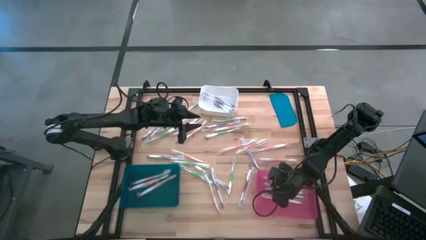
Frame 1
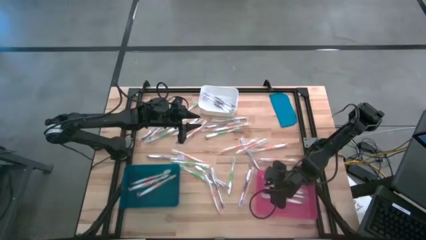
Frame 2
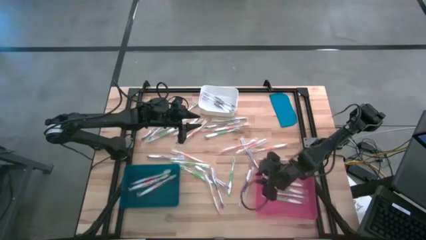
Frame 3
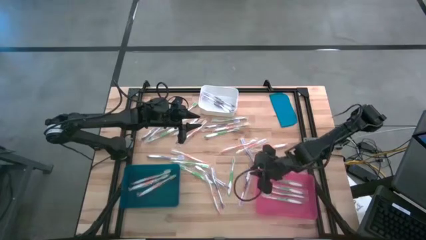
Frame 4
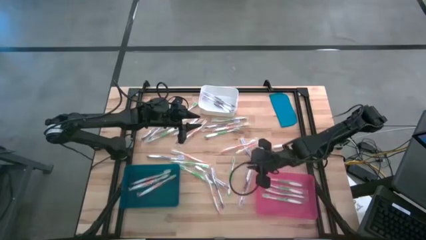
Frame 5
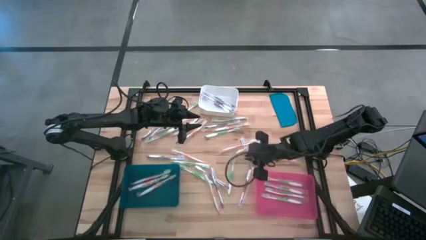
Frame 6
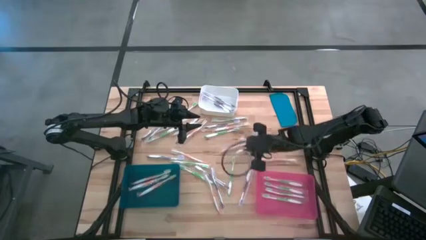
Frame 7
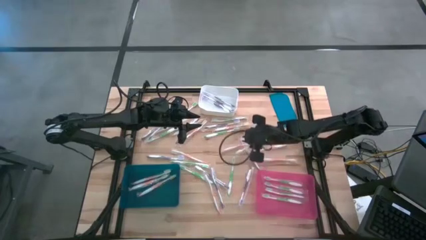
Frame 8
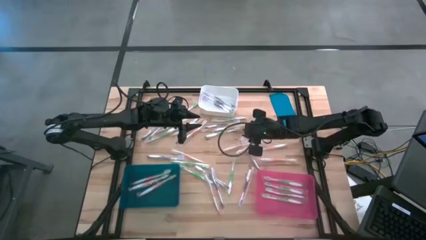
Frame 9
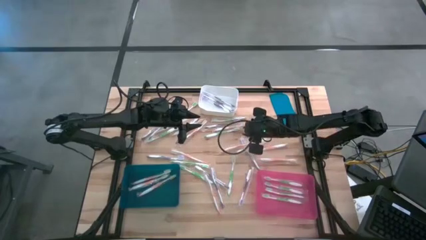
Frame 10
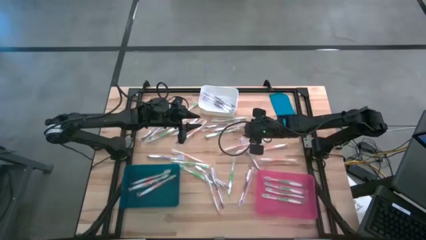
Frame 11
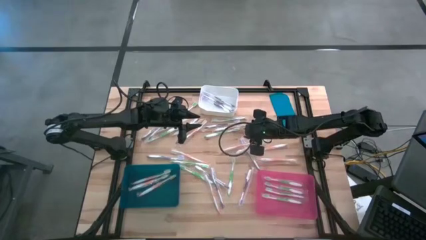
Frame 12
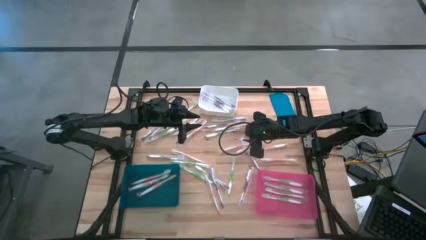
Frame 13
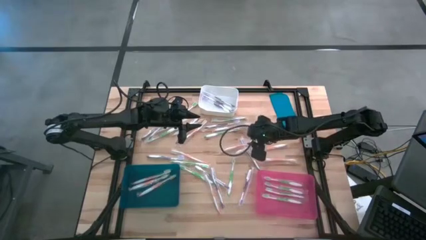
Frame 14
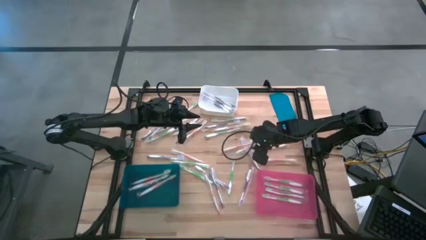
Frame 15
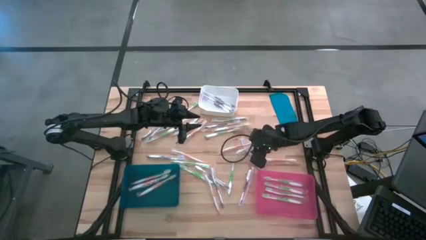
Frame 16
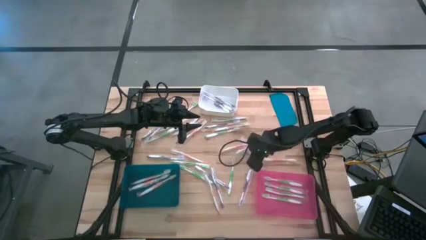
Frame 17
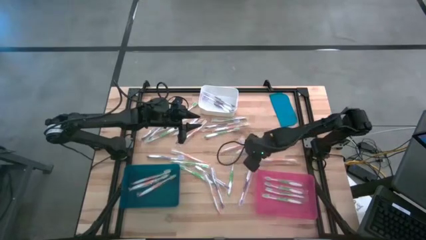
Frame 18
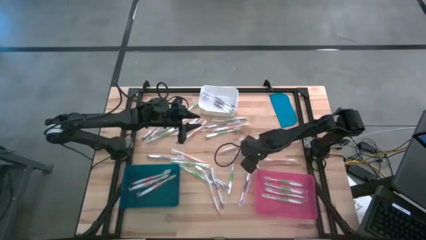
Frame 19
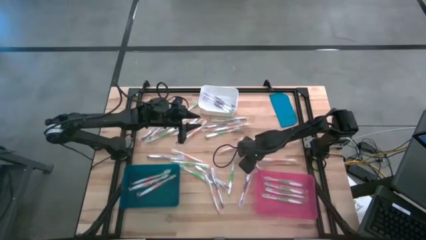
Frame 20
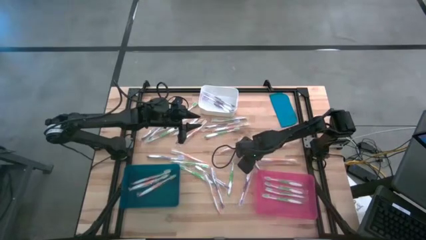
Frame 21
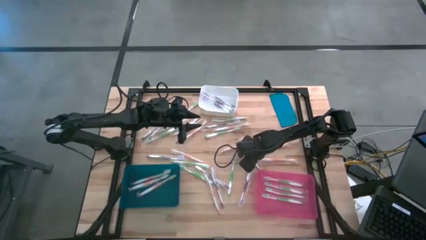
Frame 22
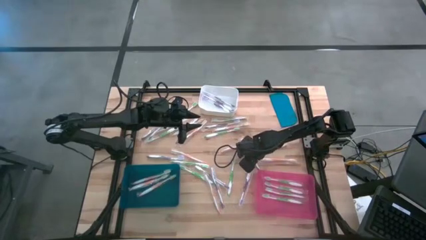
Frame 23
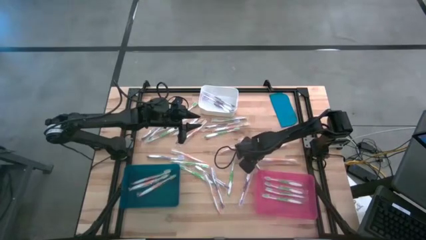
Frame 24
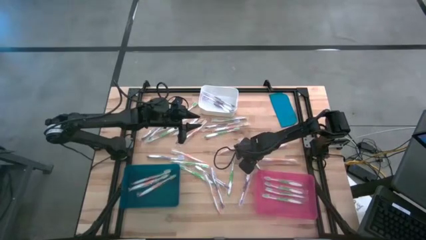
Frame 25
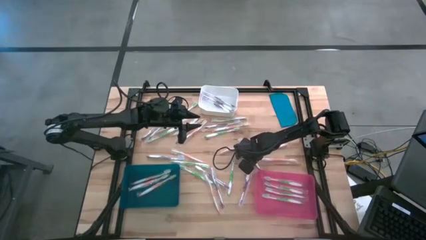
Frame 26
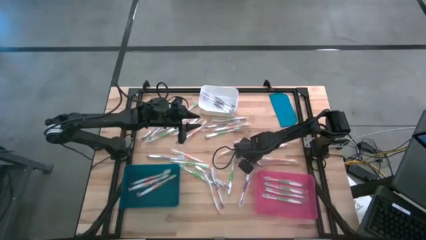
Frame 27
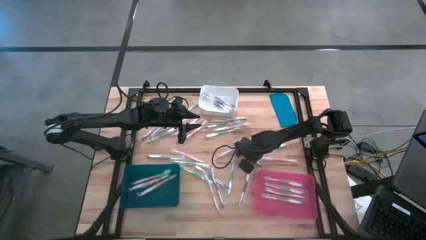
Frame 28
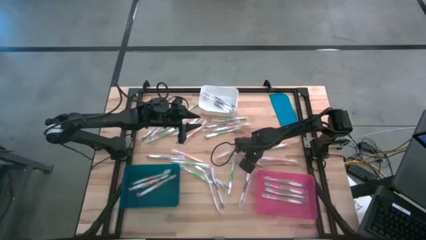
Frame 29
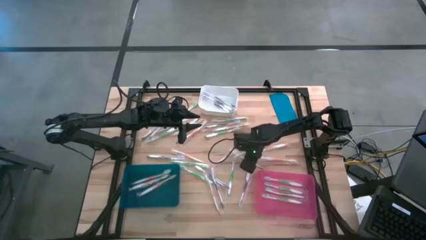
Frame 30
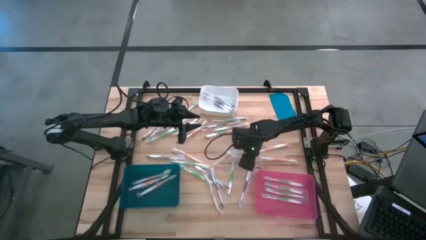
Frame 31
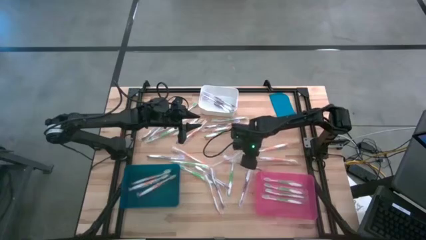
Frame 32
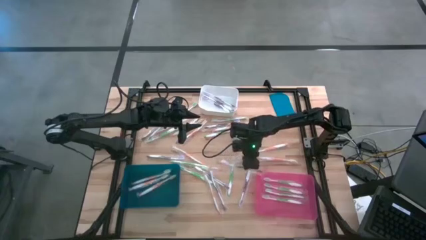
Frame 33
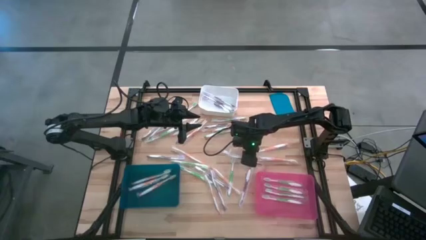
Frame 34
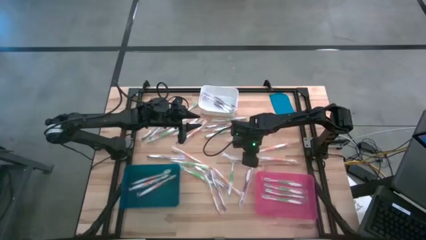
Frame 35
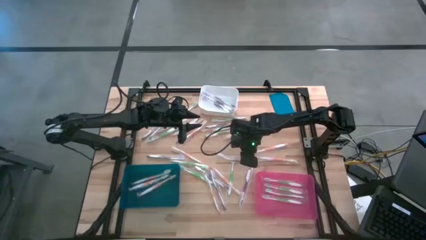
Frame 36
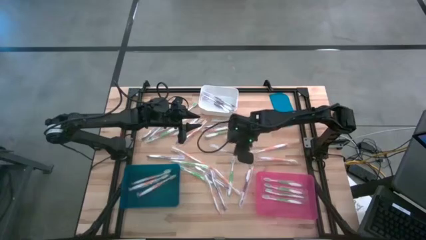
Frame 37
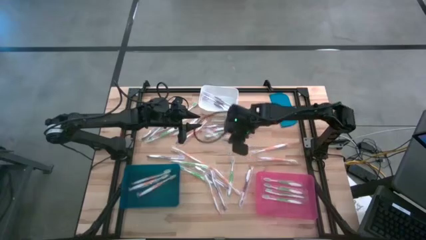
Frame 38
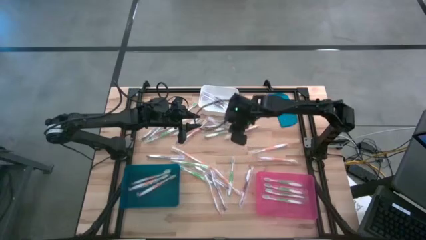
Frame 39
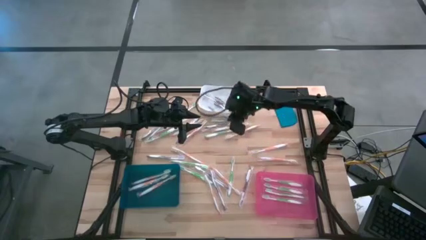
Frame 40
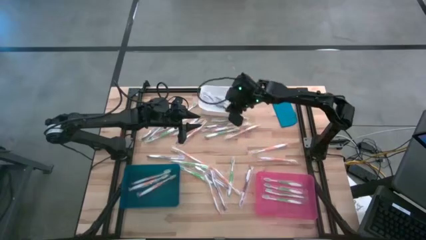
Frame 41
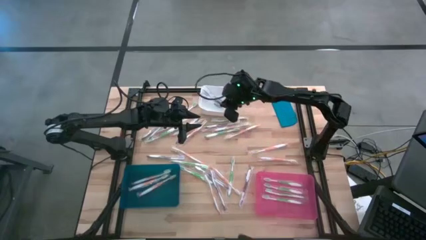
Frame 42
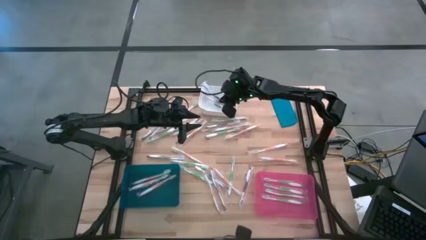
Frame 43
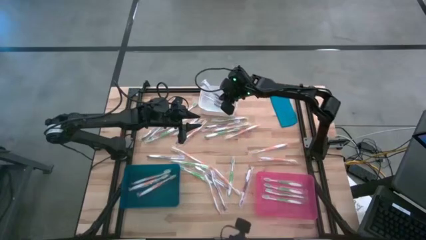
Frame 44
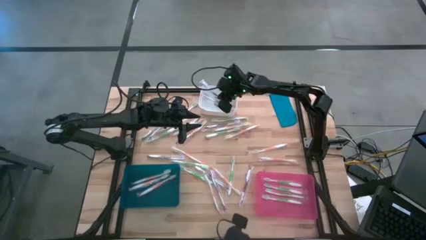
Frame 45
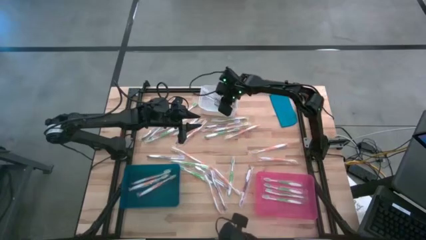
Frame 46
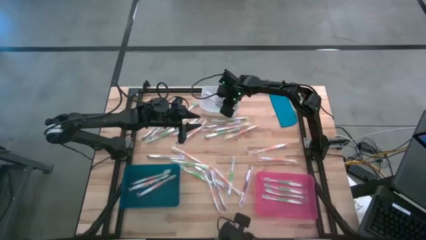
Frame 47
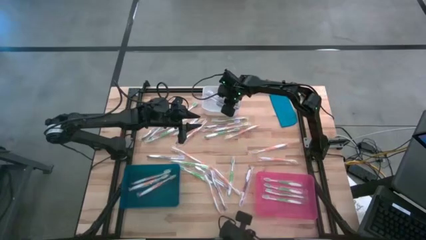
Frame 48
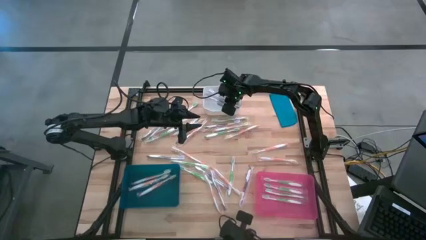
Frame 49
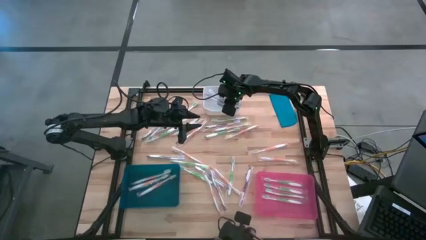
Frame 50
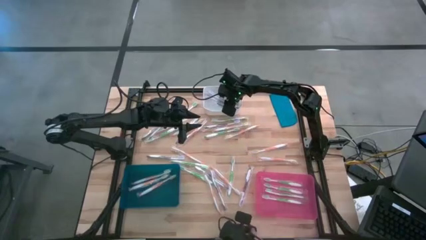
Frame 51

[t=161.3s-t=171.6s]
Task: Pick & Place Toothbrushes
Put the violet toothbrush into the white bin
